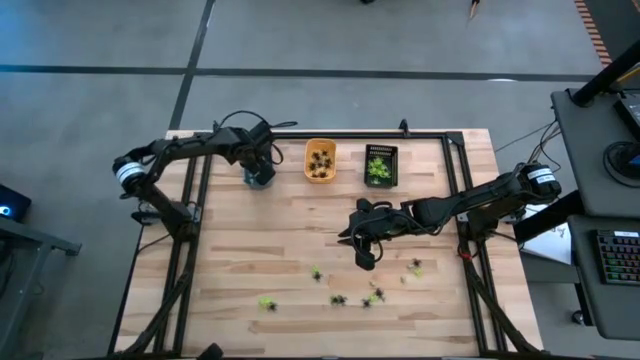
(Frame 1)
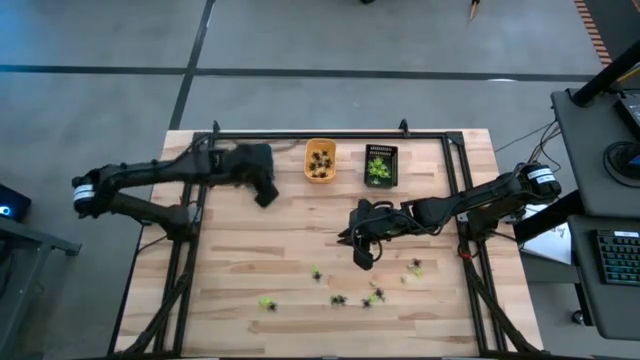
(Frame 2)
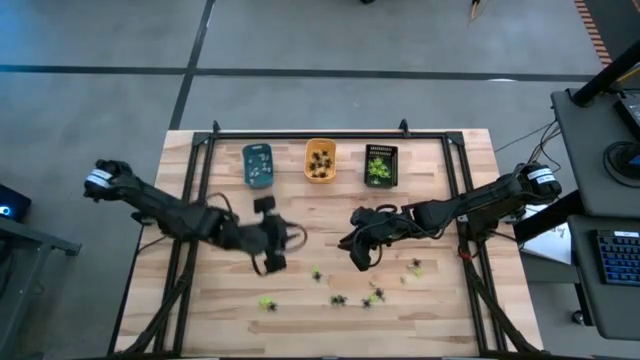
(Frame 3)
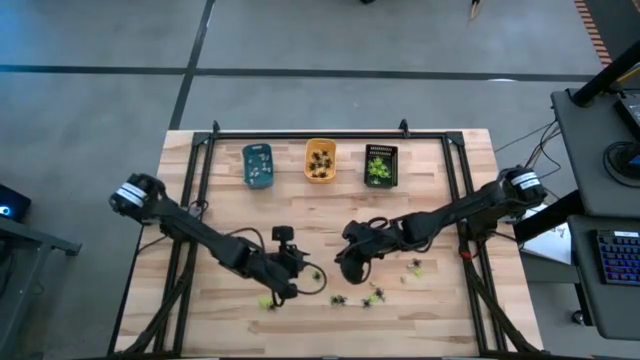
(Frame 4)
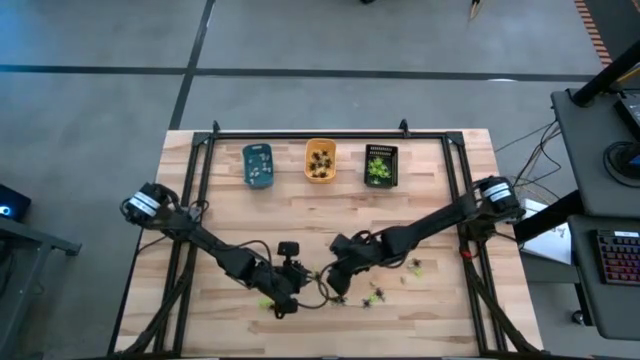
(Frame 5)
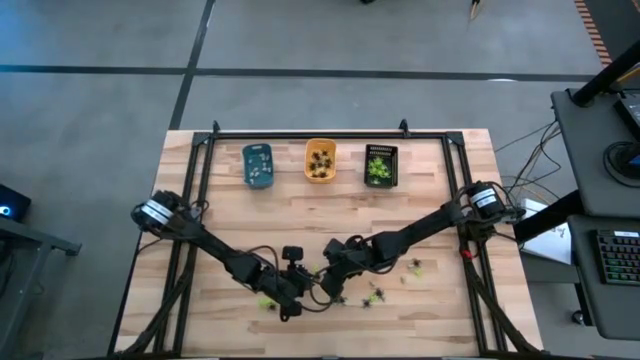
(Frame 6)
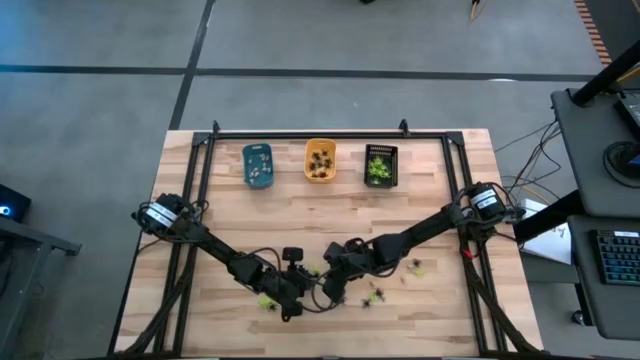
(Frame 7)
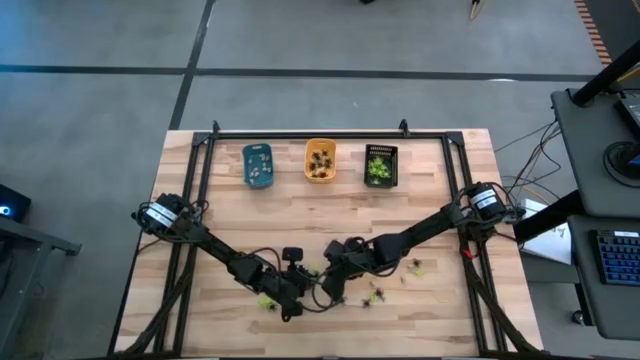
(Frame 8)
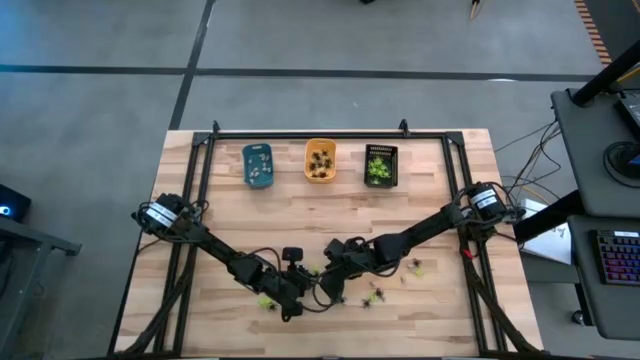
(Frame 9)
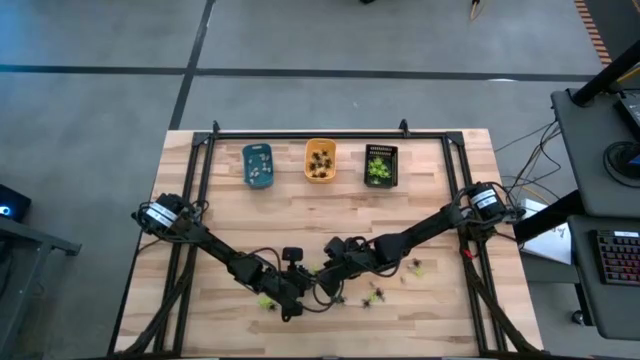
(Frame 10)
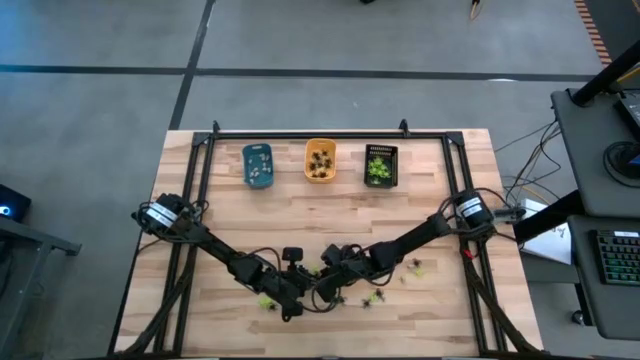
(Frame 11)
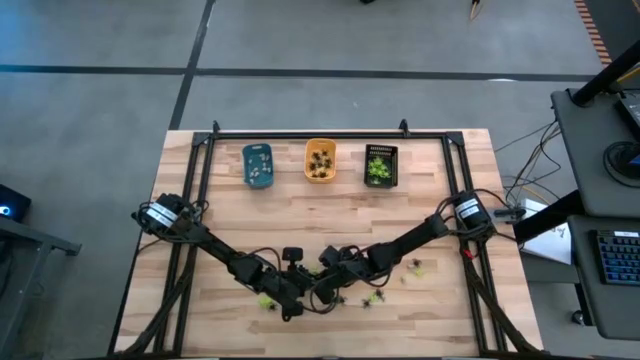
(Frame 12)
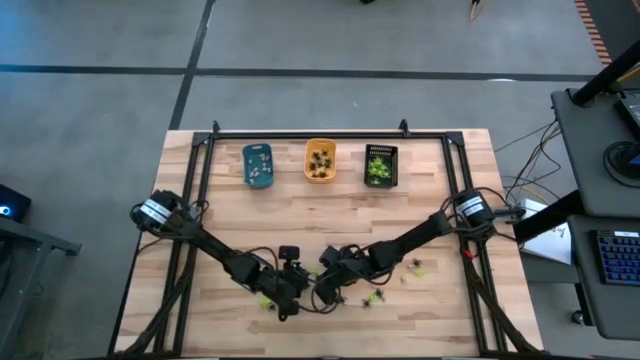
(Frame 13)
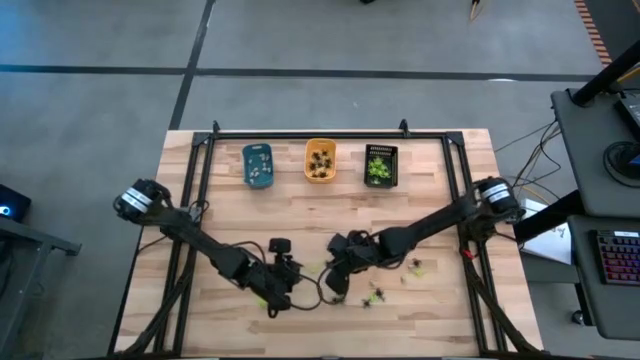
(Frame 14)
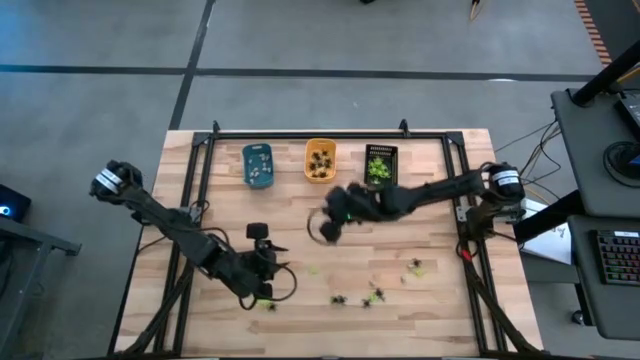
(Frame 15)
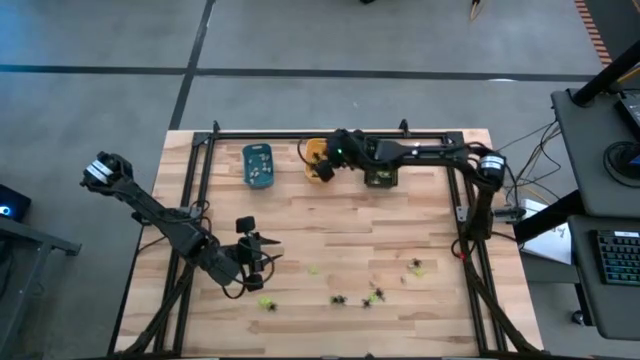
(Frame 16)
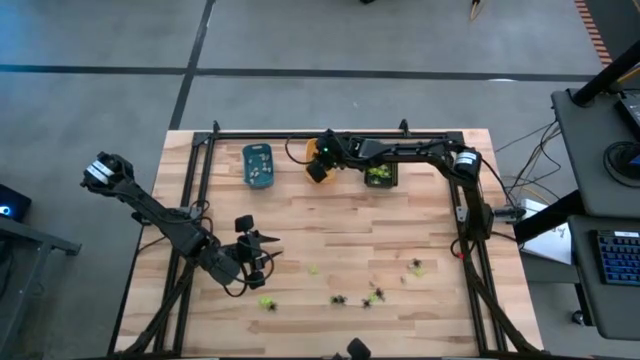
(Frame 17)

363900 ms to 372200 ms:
Task: Sort Halloween decoration
Put the black spider toy into the orange bin

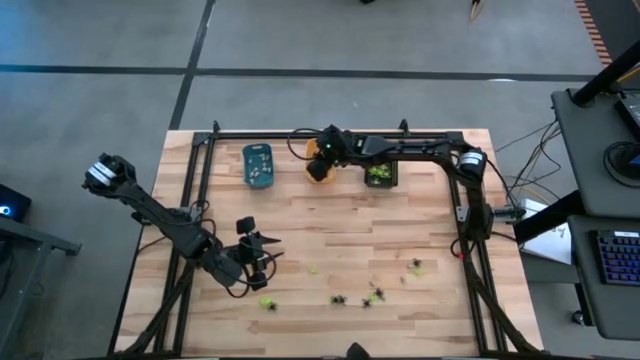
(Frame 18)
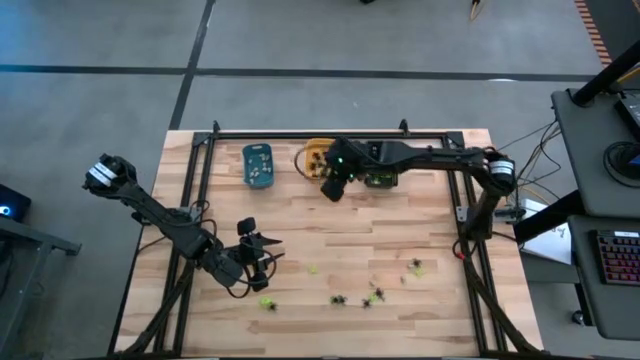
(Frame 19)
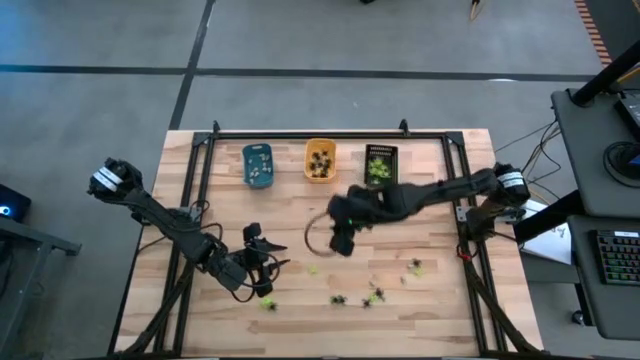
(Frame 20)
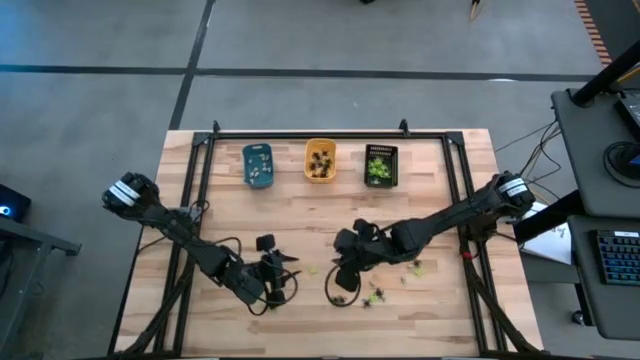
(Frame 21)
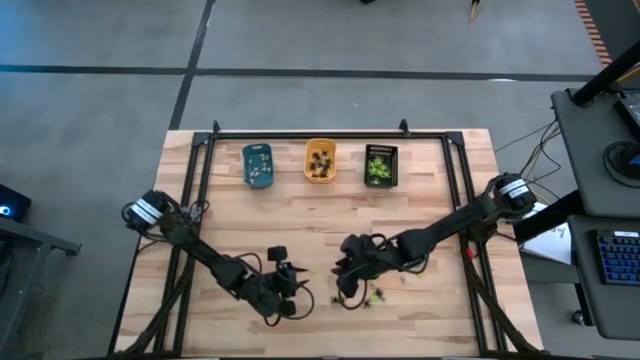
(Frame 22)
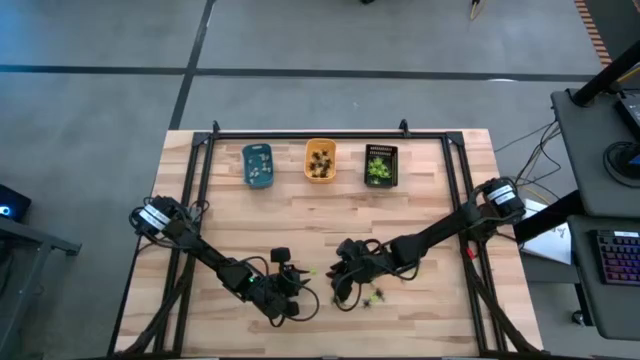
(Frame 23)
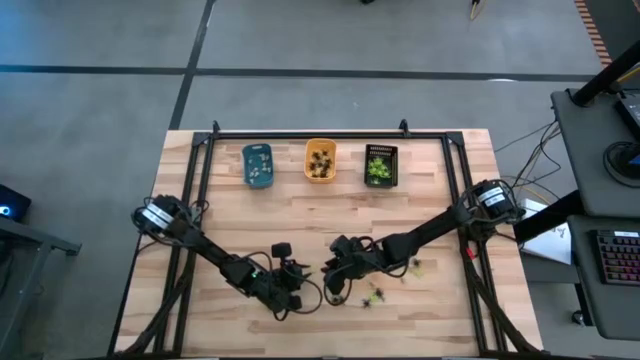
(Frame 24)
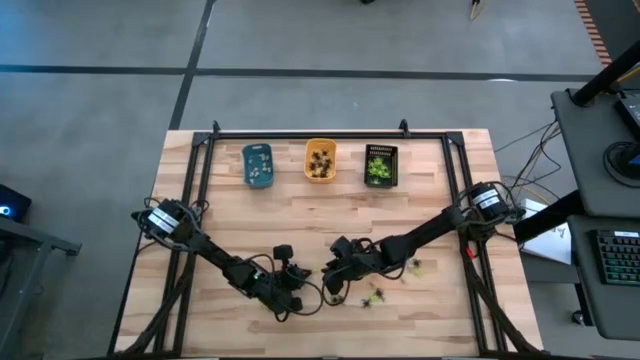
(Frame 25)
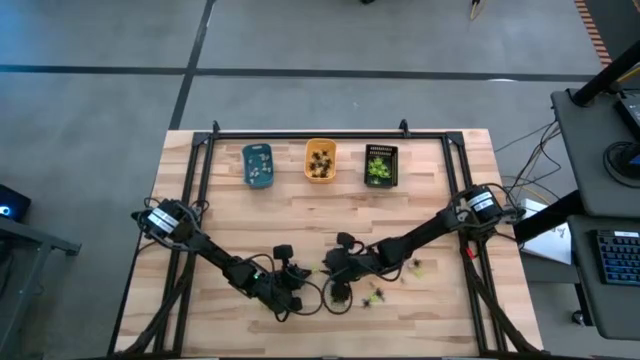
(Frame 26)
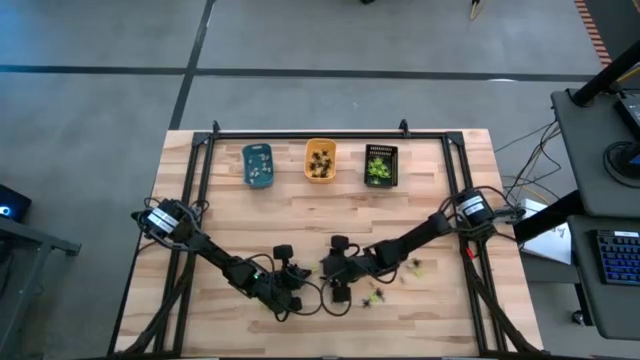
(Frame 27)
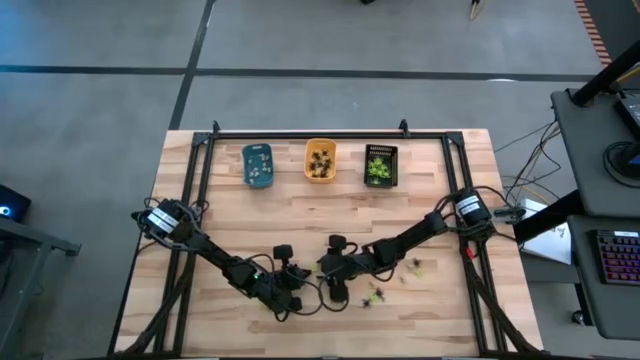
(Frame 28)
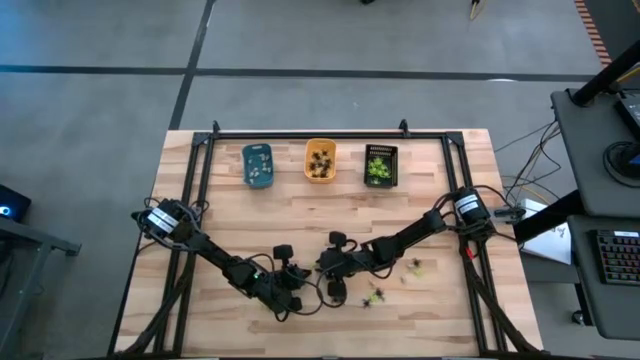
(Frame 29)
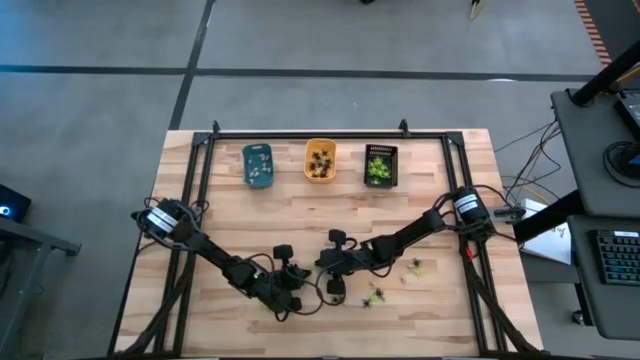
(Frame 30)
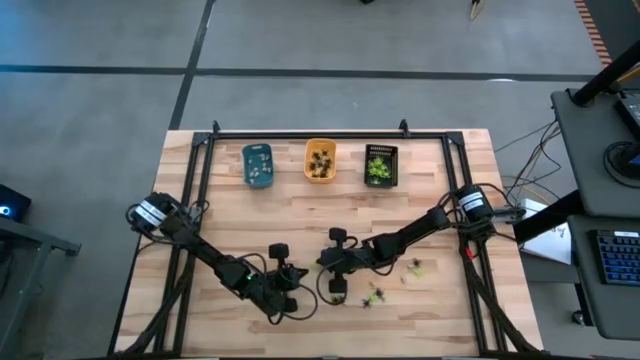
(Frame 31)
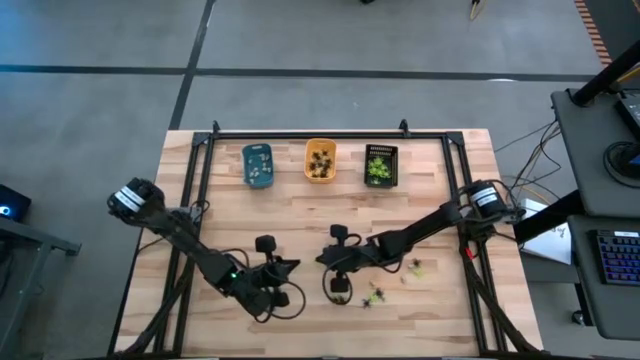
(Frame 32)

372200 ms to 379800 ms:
Put the green spider toy into the black bin

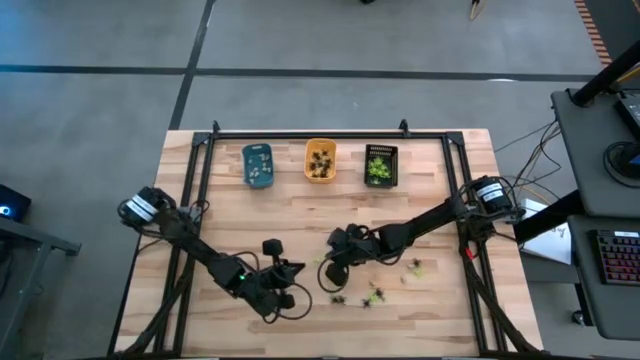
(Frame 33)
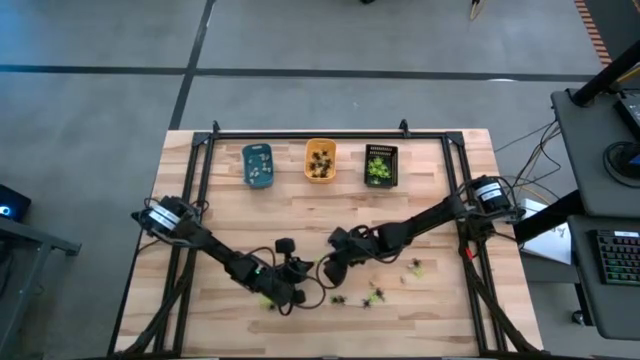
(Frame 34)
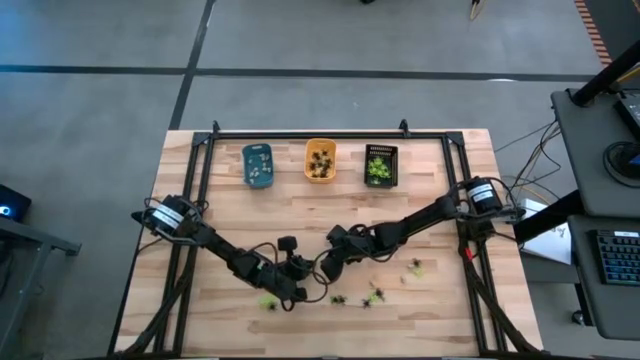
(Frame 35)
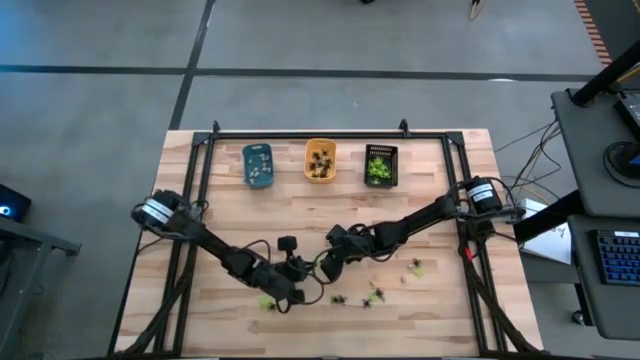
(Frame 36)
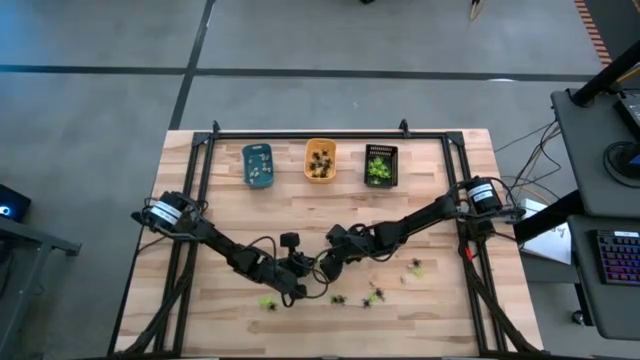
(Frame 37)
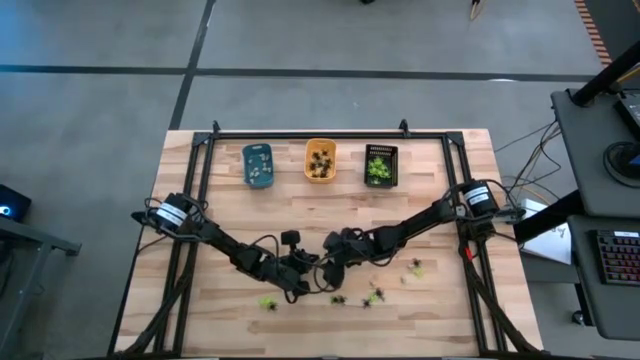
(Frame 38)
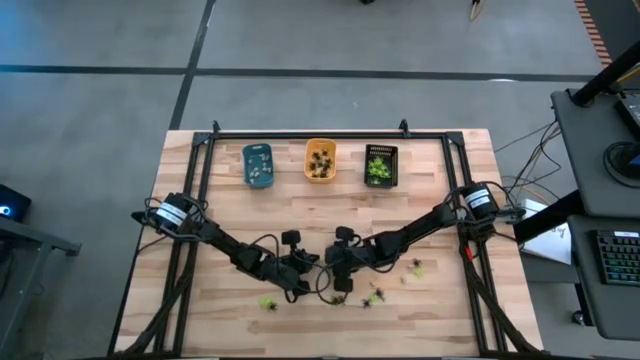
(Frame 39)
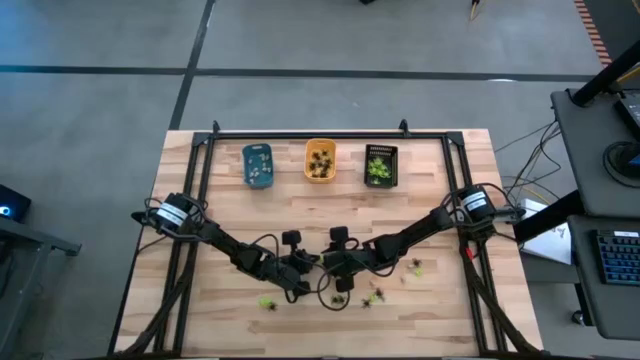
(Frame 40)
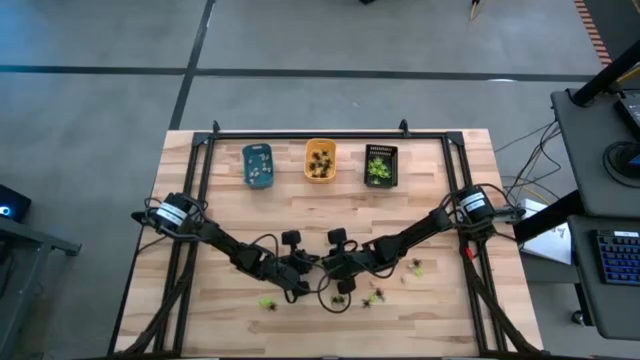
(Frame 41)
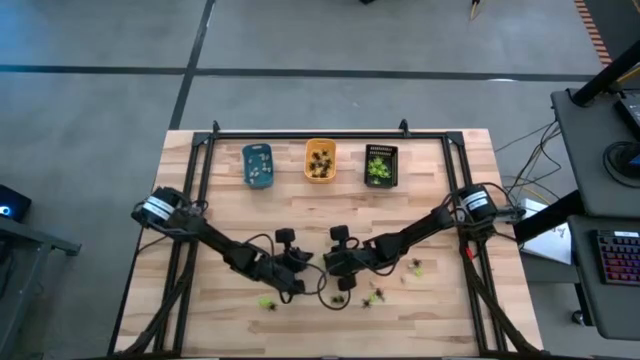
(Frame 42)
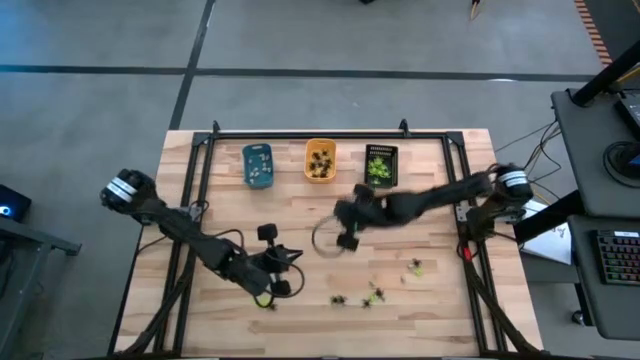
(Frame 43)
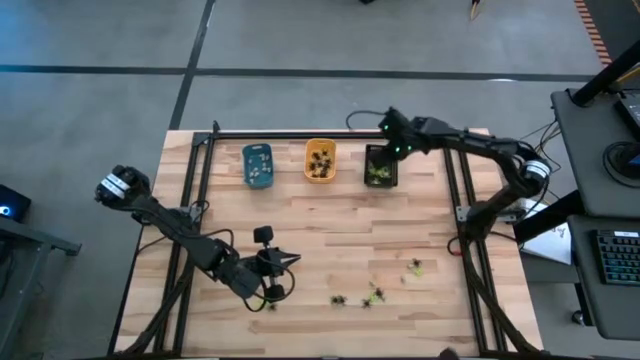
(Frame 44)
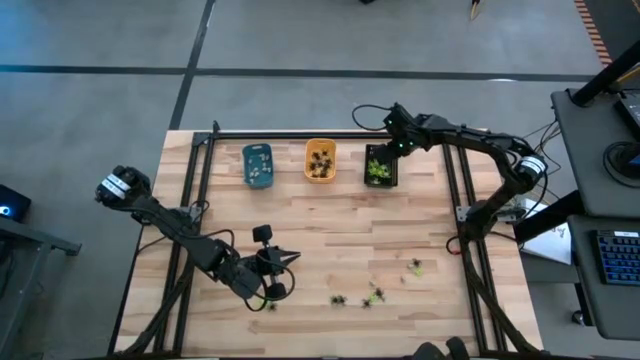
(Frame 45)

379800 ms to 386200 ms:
Put the green spider toy into the black bin
